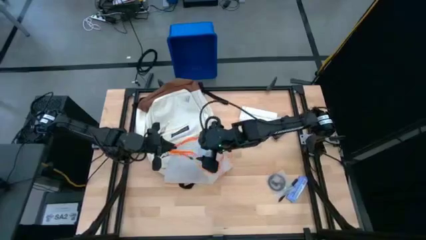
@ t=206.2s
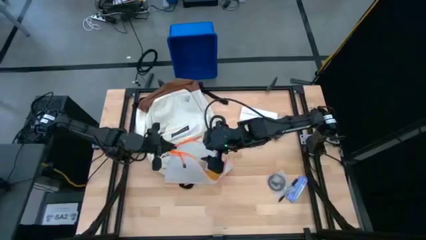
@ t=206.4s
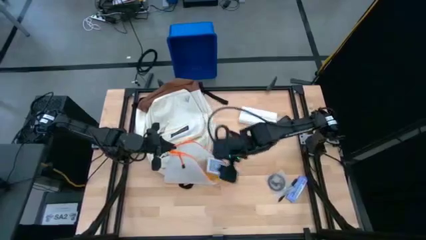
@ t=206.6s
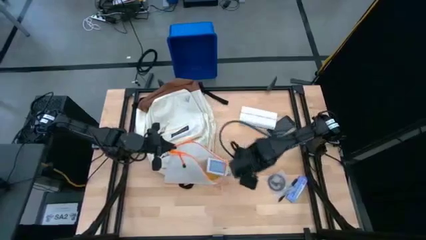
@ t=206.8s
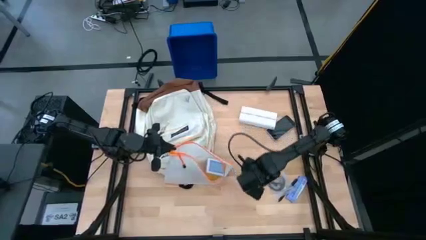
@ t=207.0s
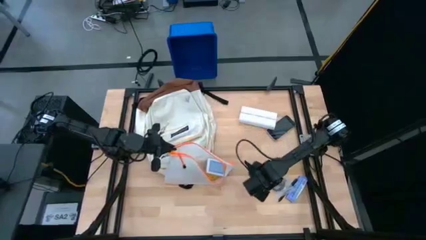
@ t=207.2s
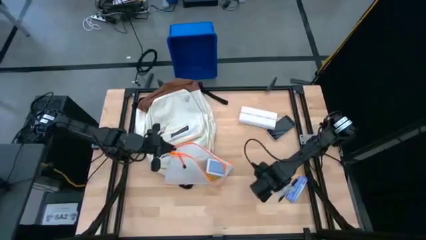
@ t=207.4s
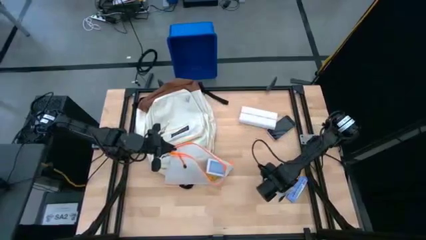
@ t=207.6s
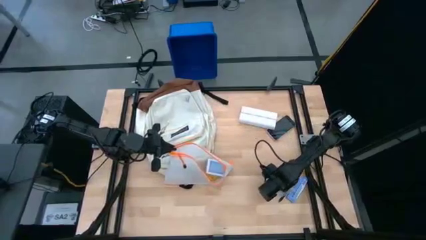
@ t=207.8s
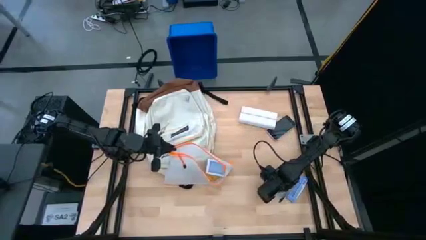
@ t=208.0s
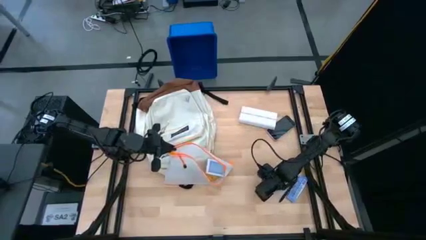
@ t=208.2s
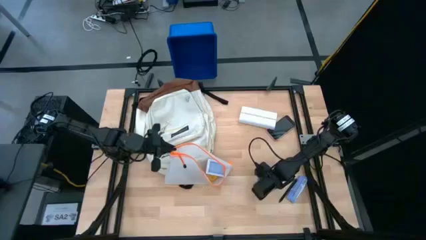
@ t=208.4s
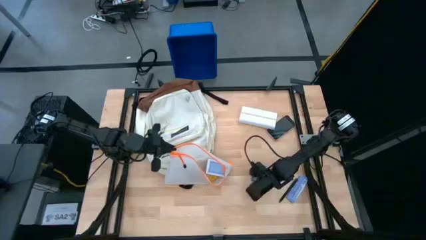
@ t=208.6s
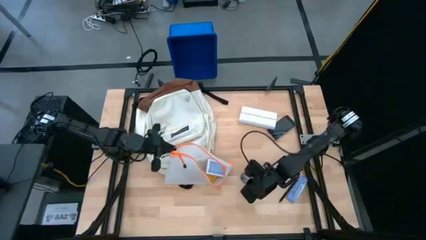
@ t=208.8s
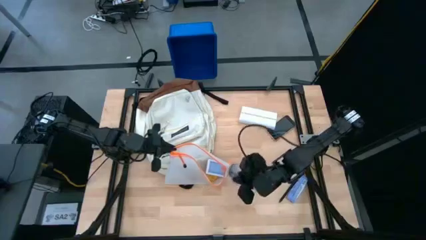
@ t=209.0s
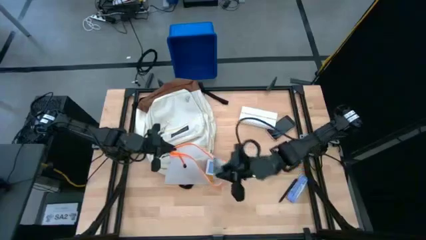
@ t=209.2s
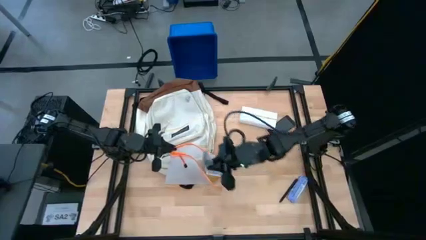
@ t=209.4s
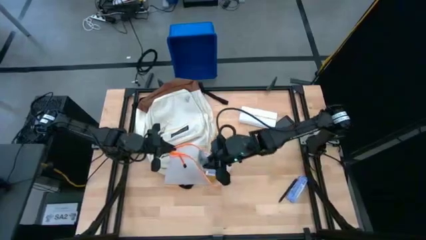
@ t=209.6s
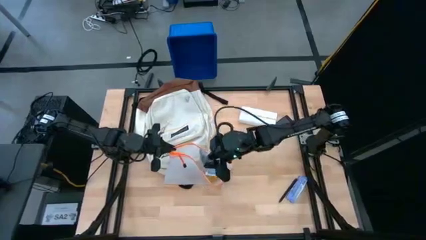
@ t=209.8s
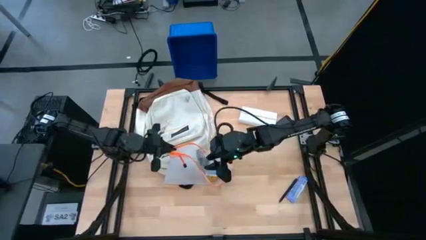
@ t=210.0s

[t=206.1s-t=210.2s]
Task: Unpack backpack
Put the black earphone into the zip bag

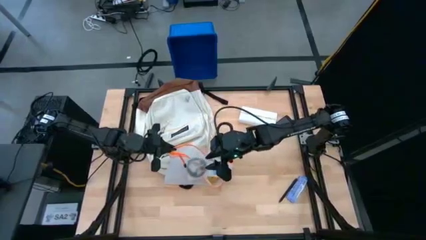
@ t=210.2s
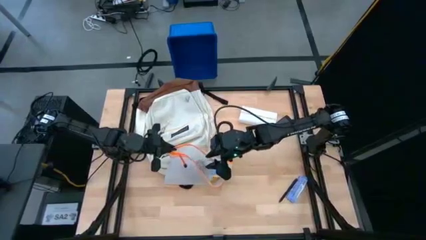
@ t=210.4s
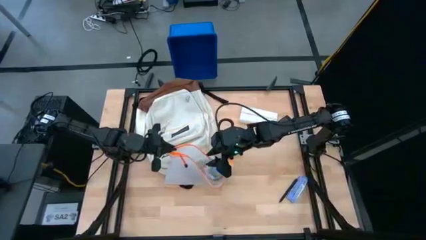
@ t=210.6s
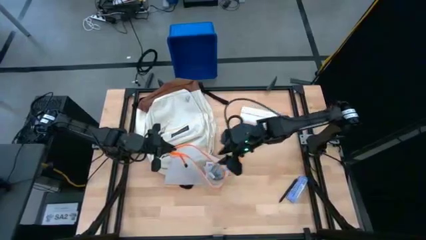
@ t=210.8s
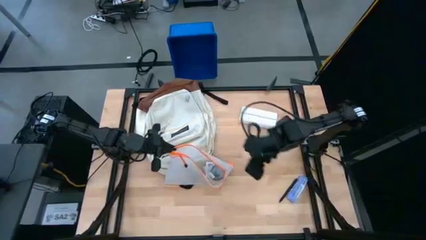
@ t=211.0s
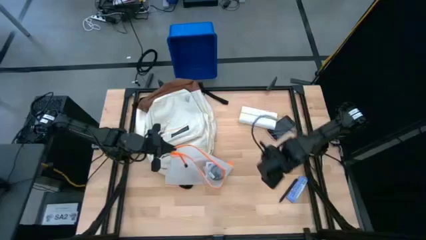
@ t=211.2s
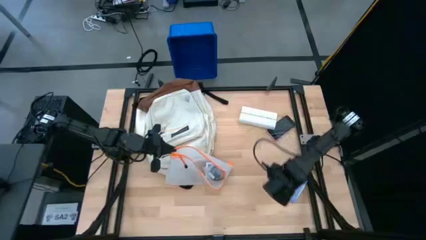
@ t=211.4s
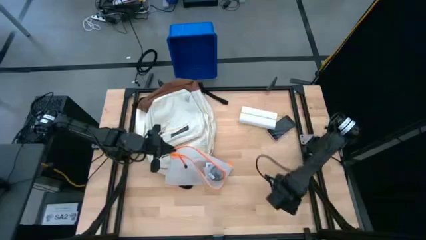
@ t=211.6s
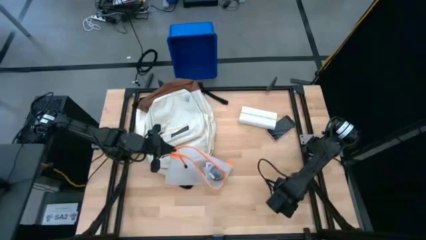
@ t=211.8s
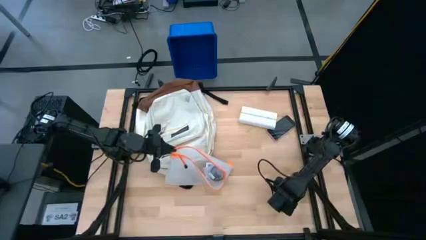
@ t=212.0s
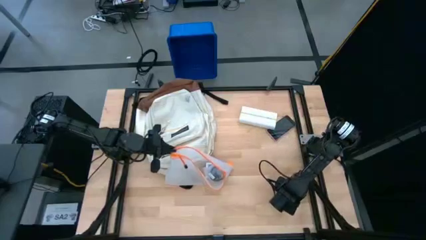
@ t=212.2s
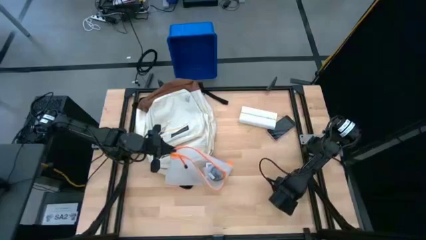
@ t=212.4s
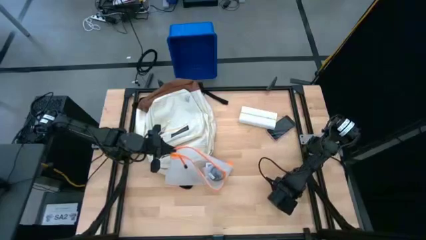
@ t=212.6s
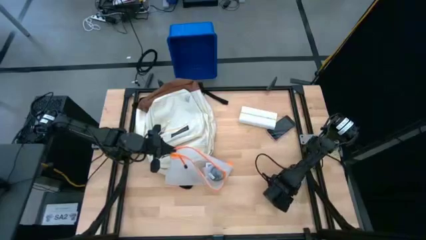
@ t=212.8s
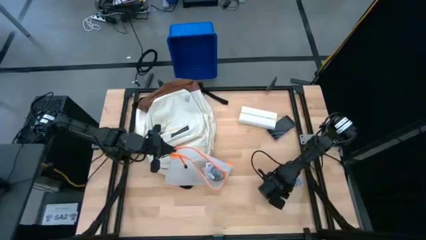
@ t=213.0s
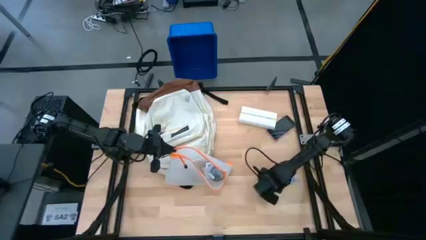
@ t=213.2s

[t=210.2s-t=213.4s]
Put the violet granola bar into the zip bag

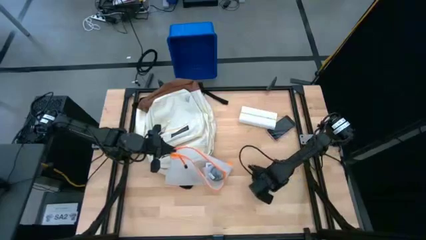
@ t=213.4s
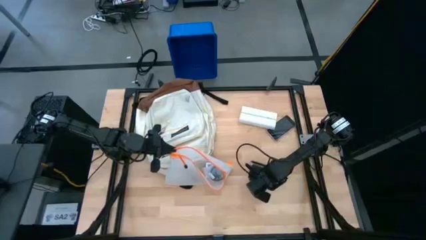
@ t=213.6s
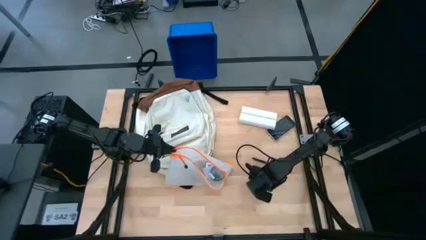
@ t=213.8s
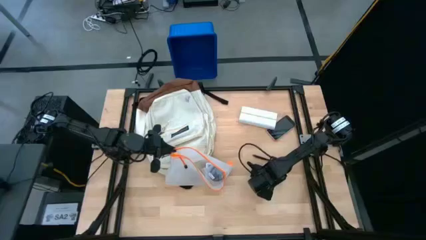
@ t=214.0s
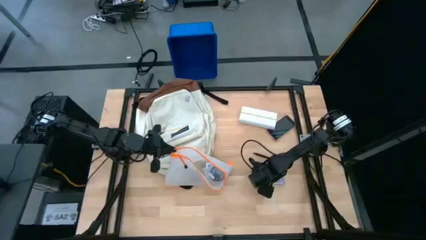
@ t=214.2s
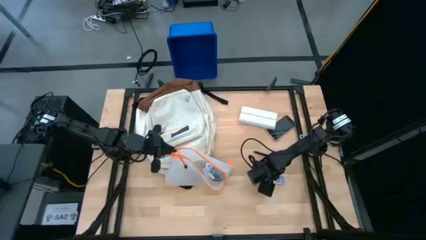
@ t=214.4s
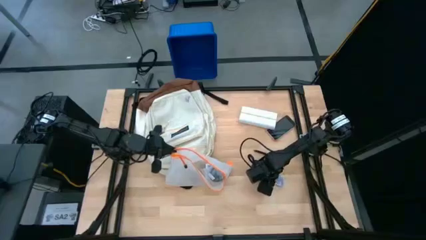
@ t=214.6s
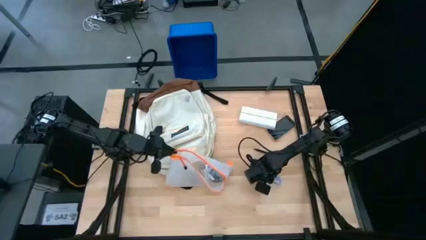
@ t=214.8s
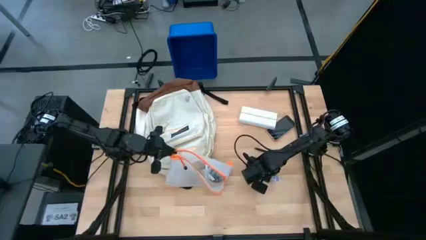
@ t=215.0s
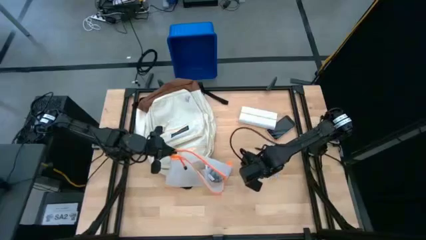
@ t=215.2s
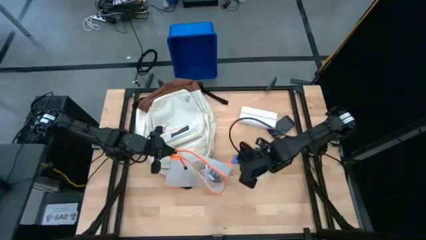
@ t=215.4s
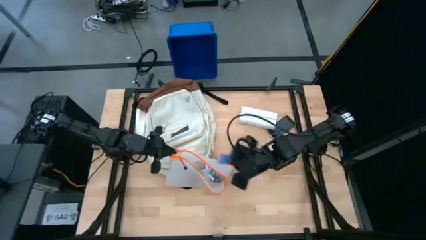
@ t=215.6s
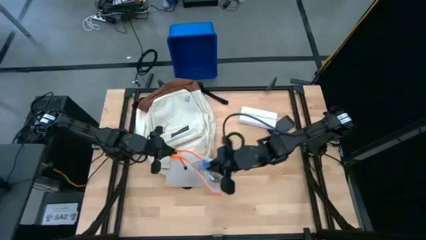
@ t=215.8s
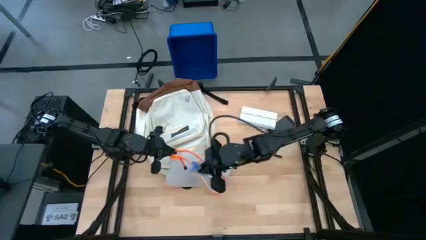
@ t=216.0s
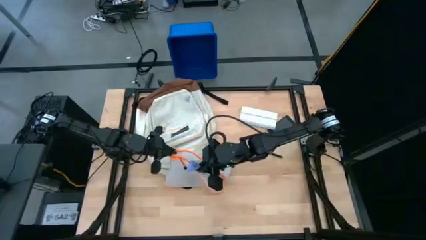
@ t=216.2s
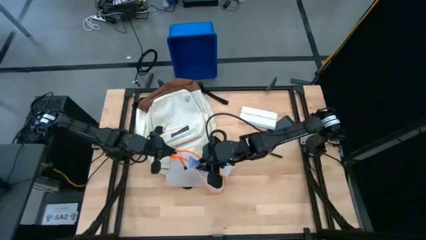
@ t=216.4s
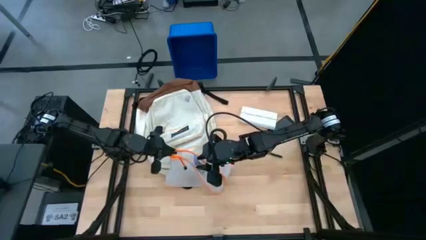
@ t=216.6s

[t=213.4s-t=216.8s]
Put the violet granola bar into the zip bag

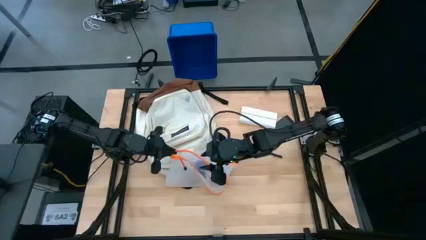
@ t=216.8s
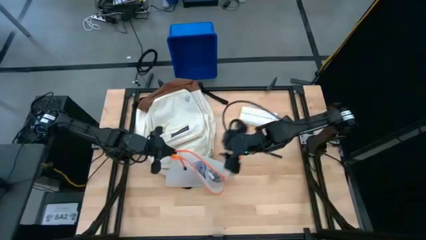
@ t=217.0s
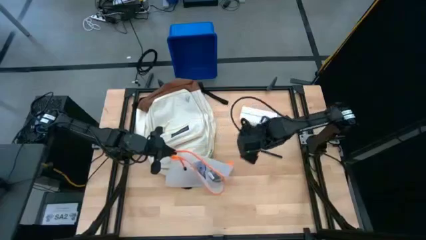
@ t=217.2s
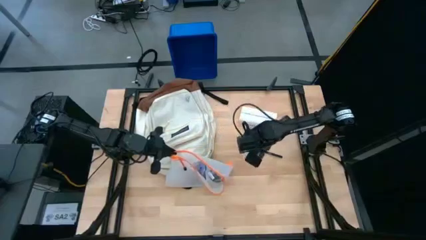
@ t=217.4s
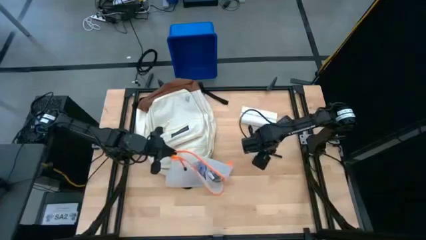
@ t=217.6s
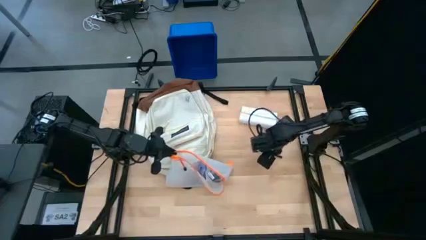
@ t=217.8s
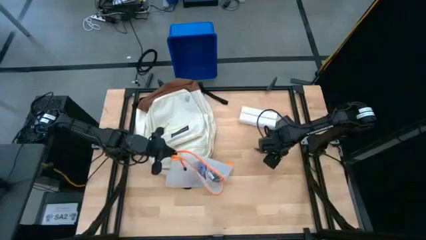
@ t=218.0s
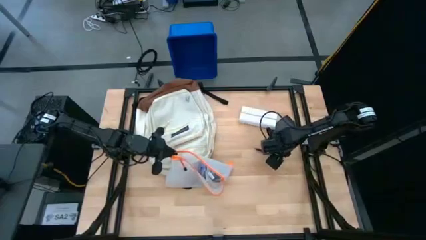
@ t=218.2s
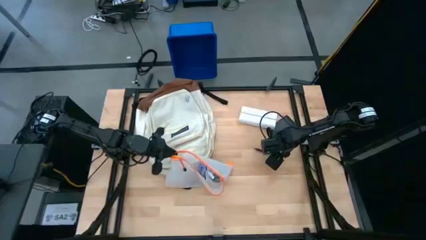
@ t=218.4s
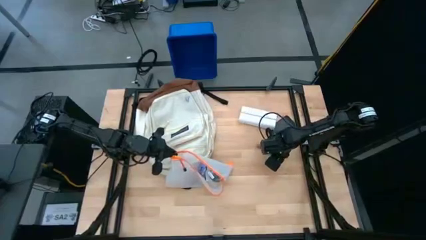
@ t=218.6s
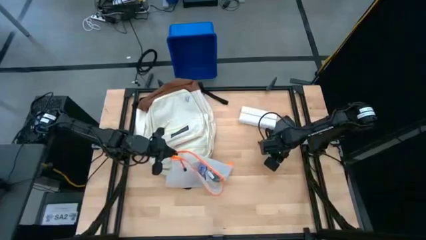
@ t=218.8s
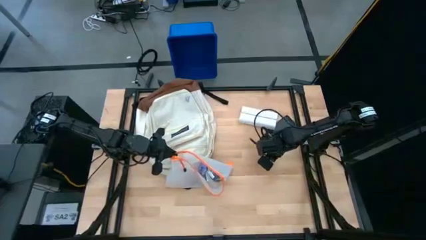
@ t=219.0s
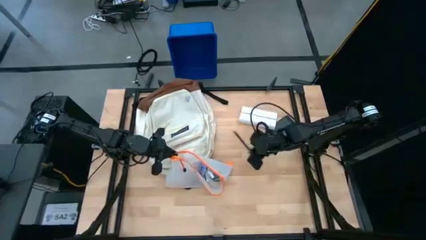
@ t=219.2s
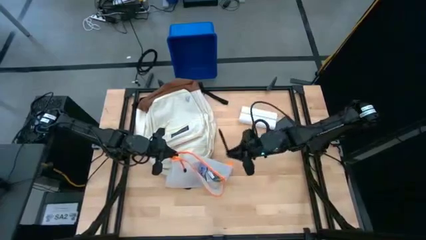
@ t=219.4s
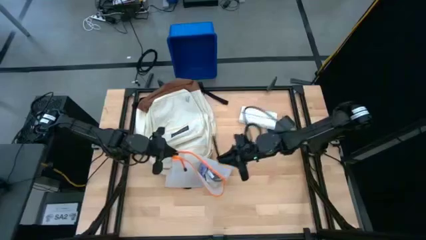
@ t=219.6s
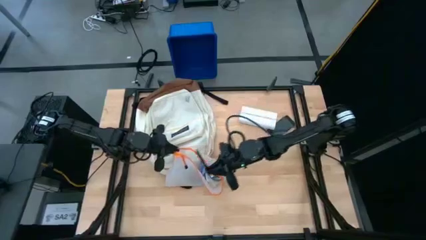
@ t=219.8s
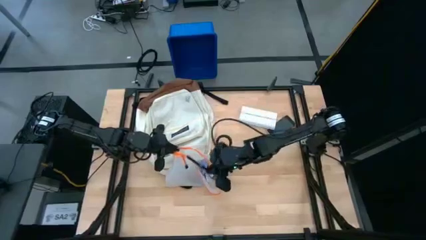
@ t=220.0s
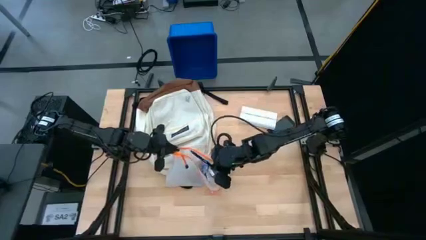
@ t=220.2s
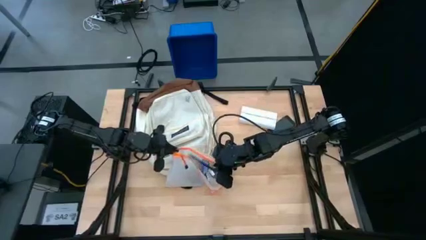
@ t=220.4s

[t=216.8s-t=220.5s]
Put the black pen into the zip bag

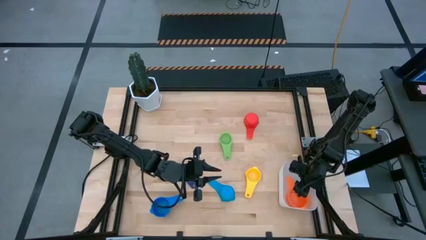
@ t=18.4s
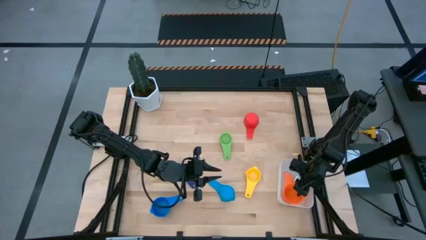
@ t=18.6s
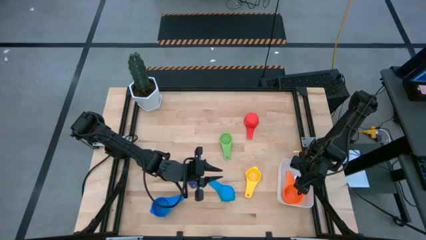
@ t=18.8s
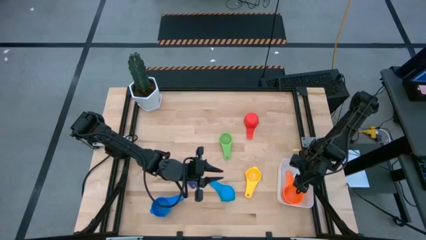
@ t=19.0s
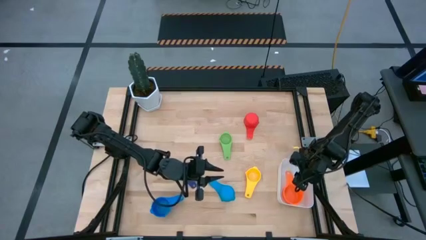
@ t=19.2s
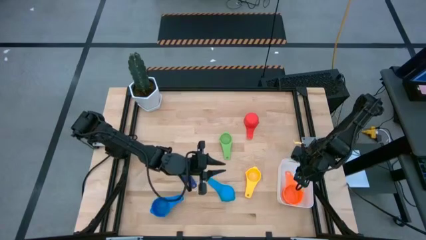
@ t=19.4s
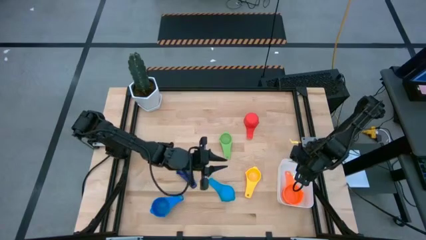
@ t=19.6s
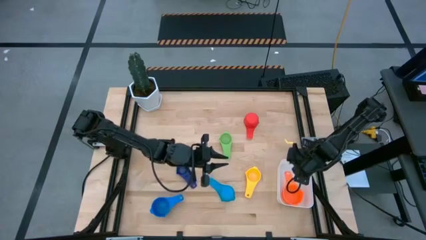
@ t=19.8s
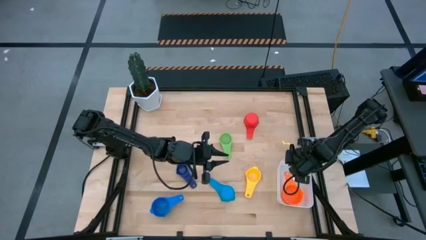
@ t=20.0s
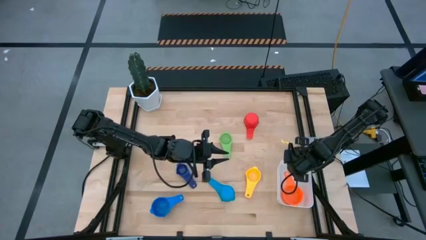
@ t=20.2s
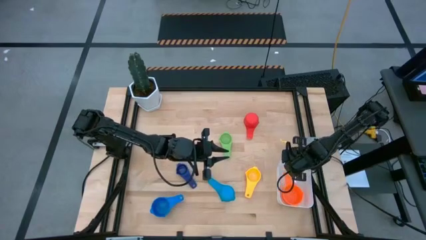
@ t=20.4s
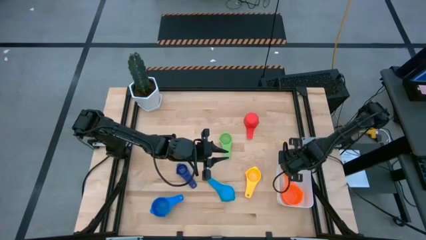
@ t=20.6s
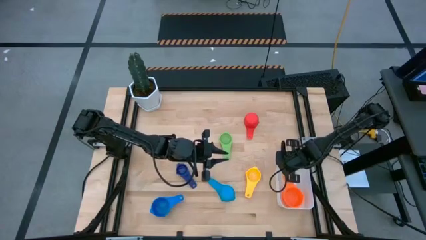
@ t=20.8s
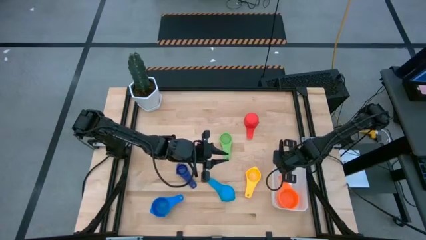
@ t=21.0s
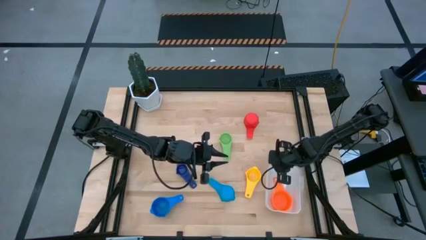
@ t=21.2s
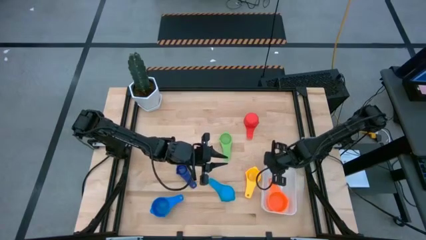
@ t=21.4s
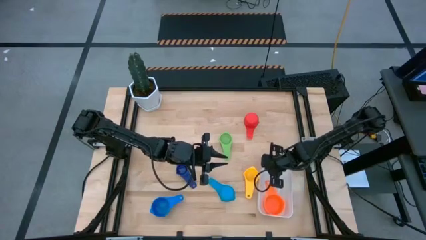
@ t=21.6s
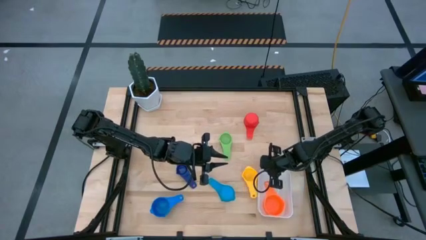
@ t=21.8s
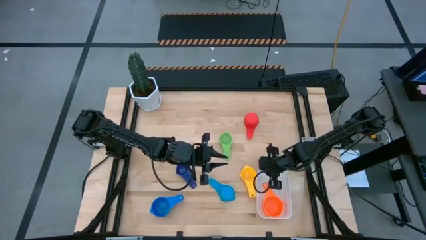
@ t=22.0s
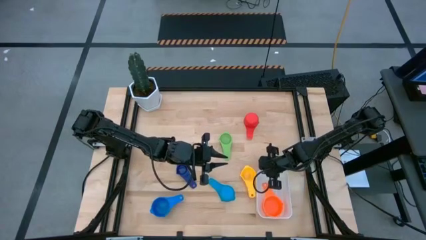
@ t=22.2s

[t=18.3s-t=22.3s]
Task: Nest measuring cups in basket
Adjust the white bin
